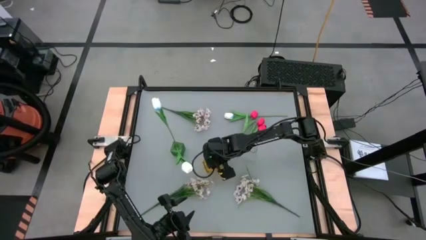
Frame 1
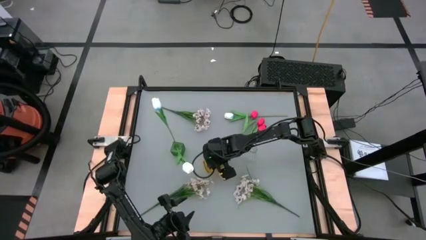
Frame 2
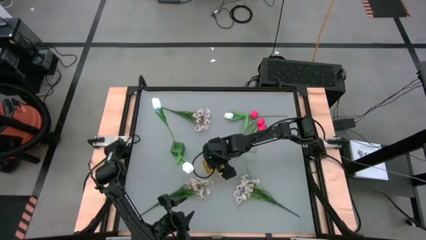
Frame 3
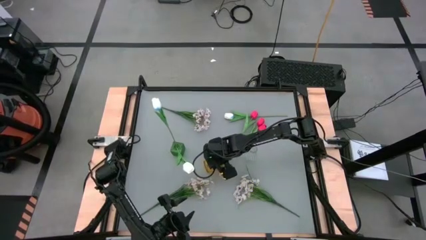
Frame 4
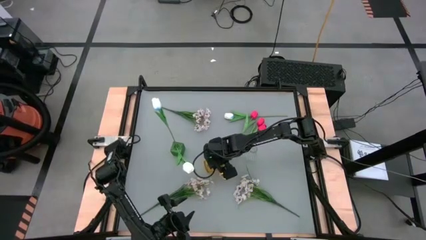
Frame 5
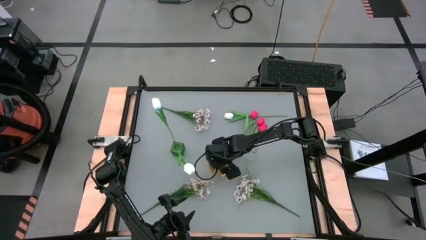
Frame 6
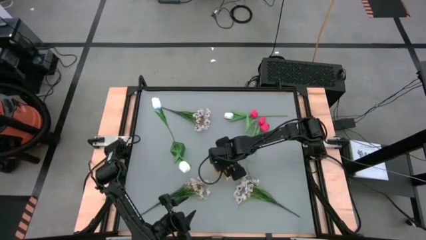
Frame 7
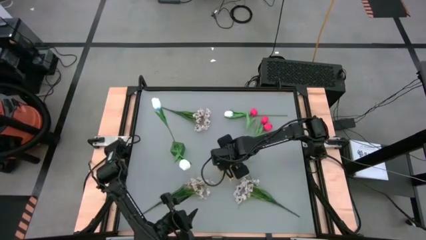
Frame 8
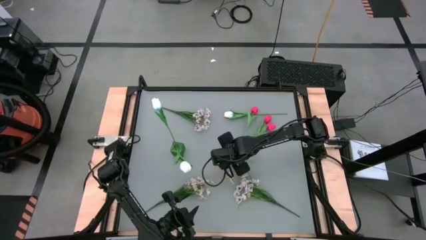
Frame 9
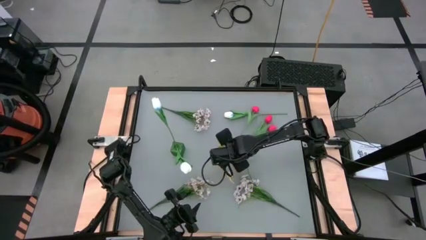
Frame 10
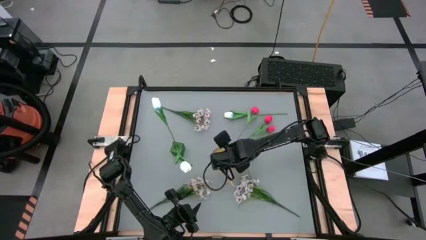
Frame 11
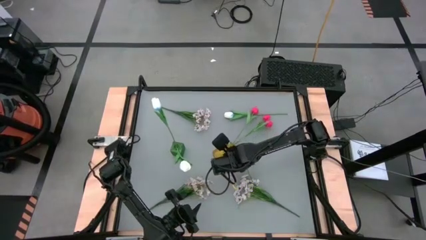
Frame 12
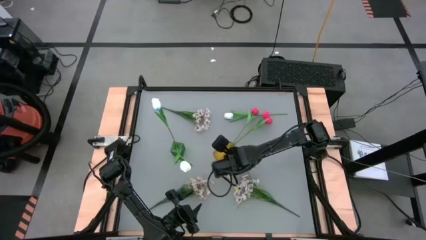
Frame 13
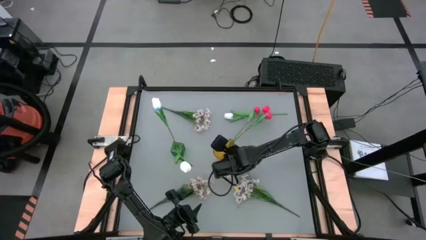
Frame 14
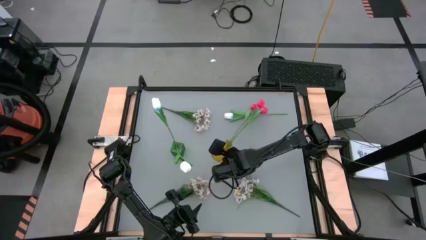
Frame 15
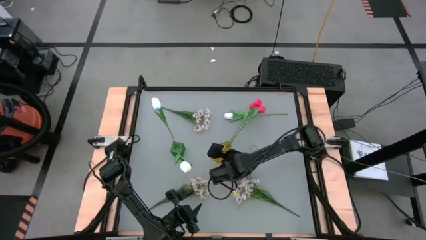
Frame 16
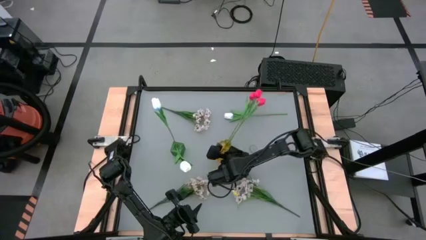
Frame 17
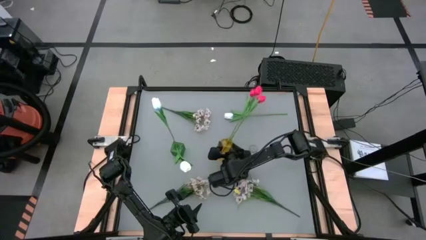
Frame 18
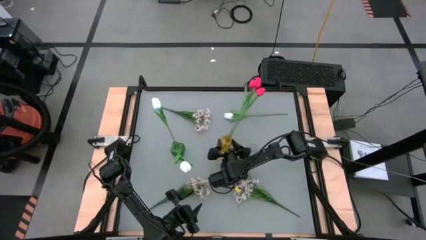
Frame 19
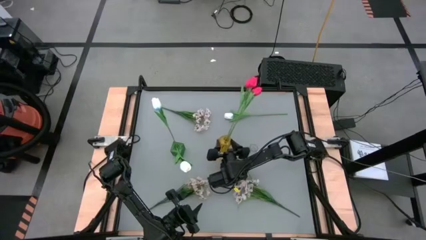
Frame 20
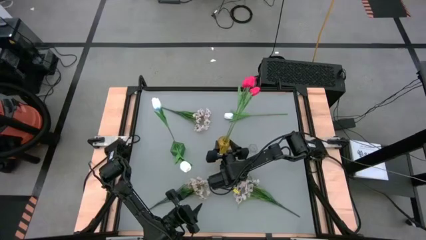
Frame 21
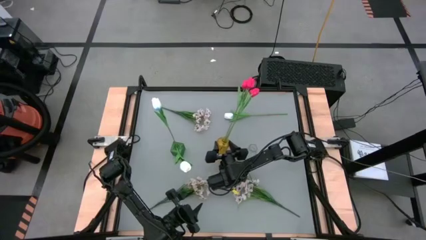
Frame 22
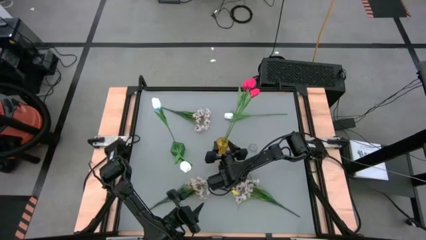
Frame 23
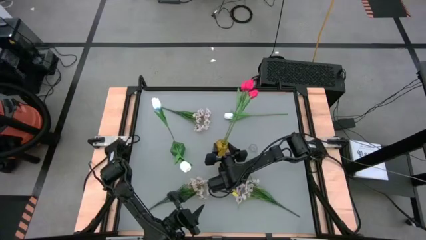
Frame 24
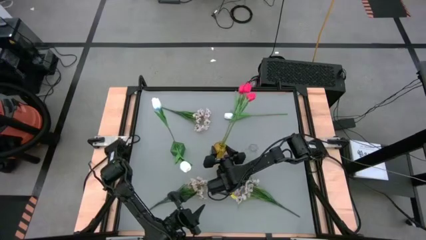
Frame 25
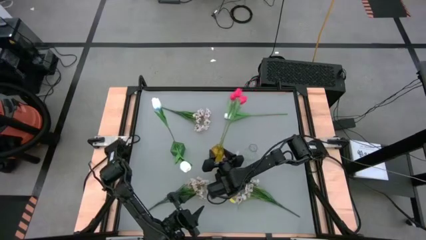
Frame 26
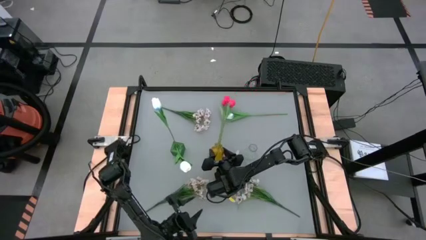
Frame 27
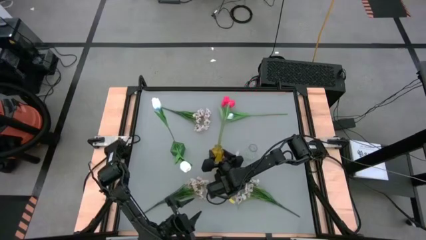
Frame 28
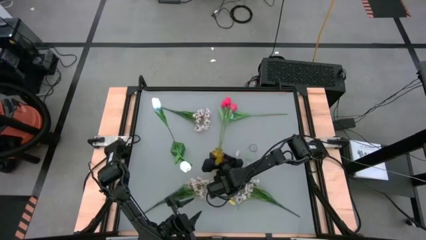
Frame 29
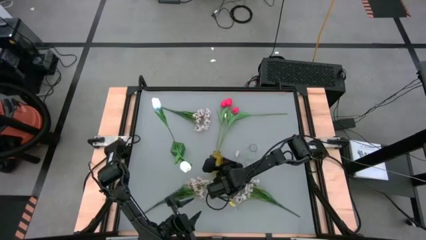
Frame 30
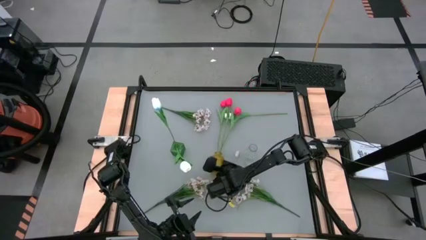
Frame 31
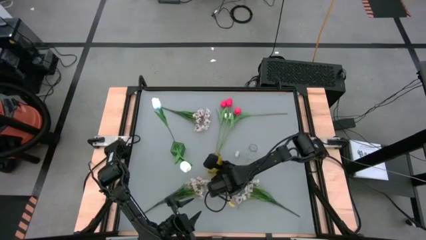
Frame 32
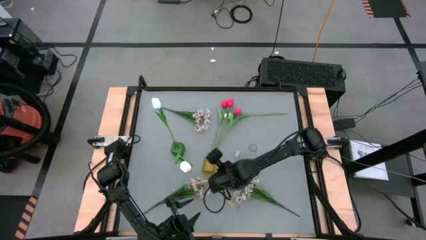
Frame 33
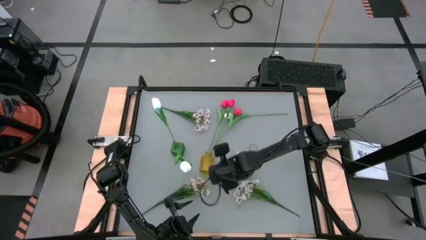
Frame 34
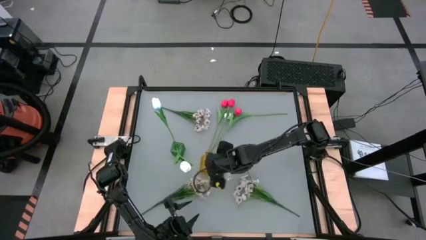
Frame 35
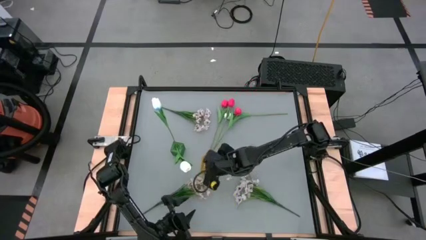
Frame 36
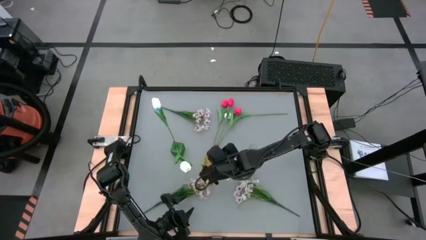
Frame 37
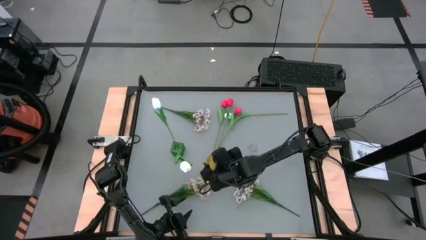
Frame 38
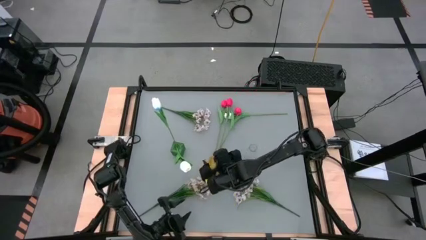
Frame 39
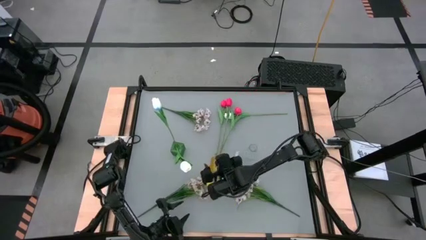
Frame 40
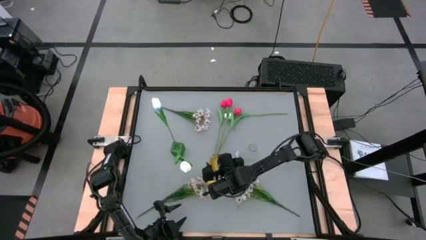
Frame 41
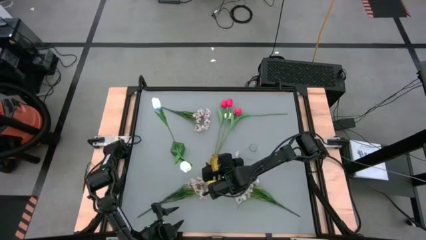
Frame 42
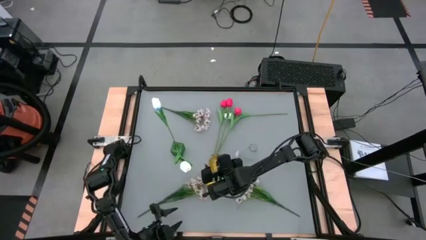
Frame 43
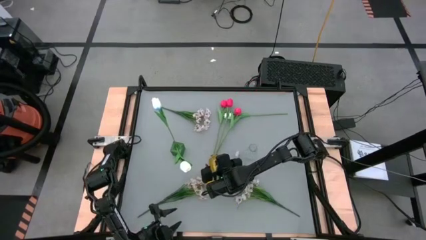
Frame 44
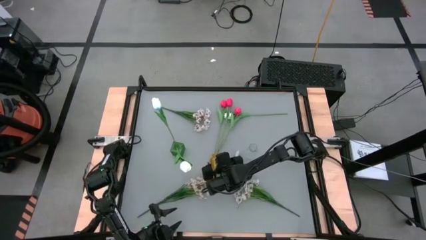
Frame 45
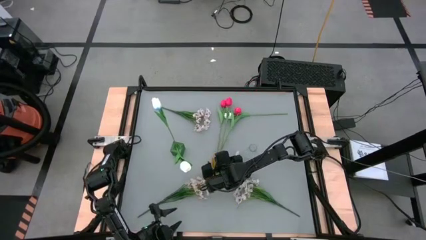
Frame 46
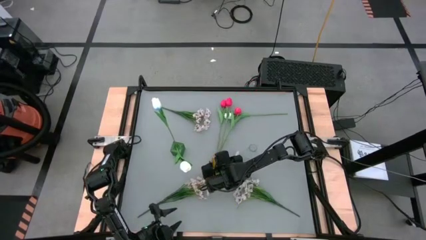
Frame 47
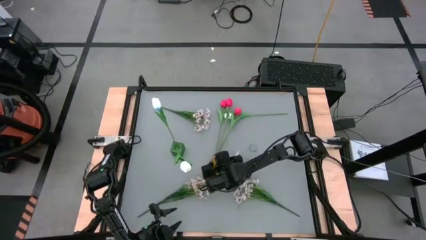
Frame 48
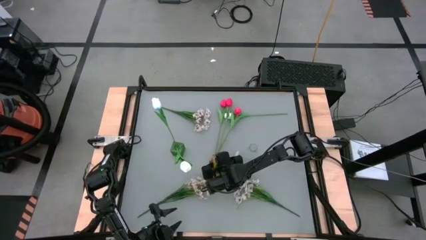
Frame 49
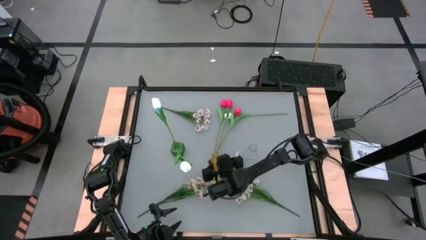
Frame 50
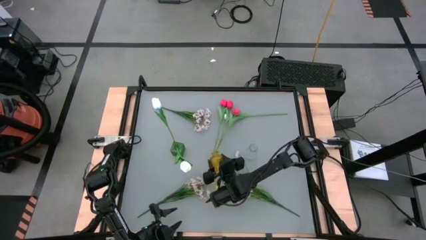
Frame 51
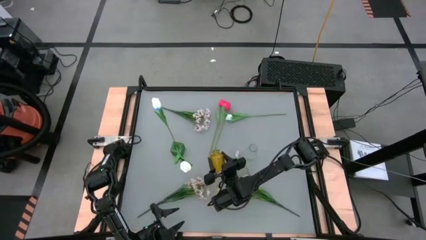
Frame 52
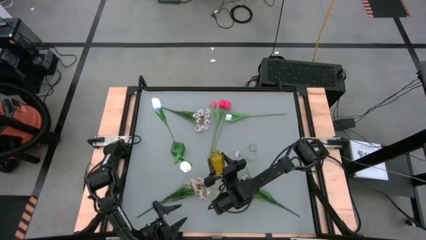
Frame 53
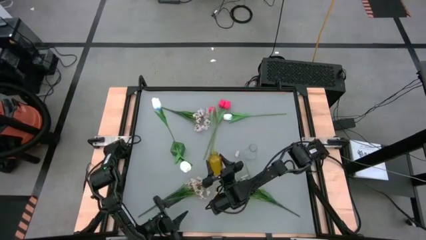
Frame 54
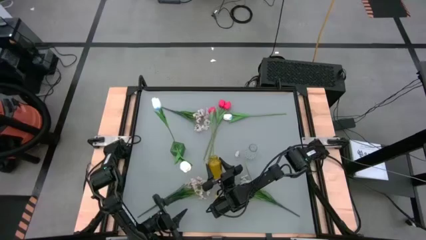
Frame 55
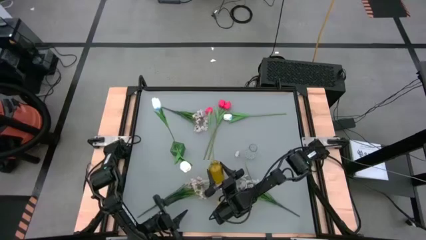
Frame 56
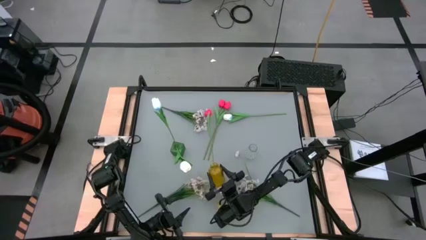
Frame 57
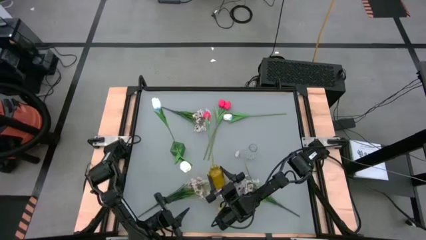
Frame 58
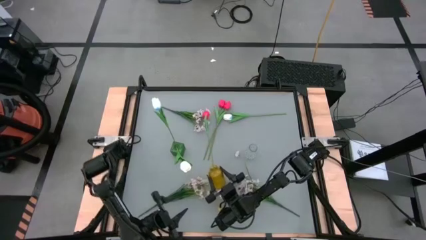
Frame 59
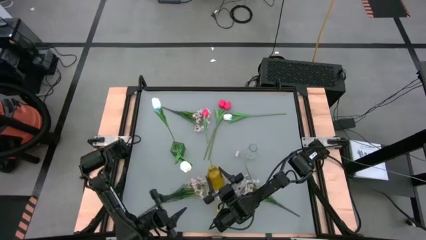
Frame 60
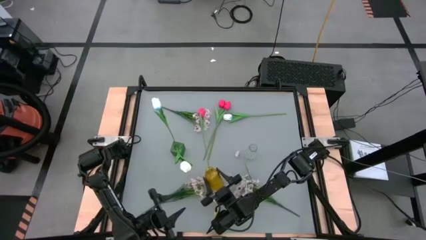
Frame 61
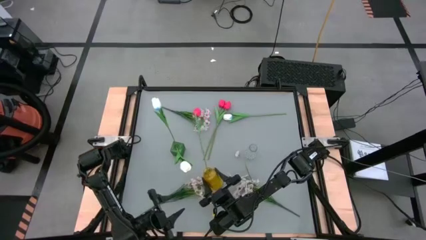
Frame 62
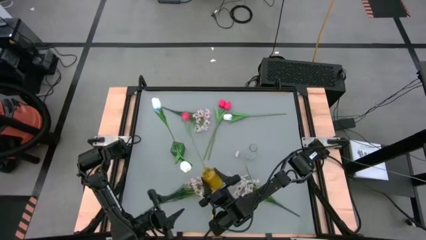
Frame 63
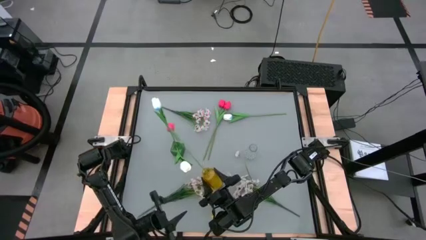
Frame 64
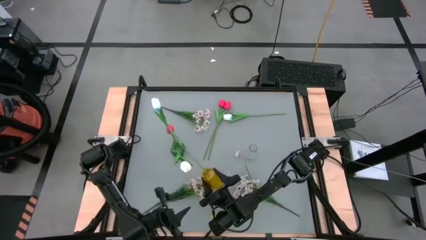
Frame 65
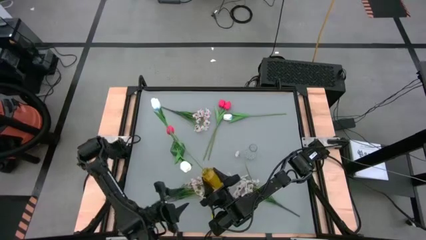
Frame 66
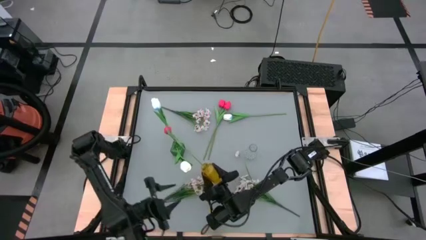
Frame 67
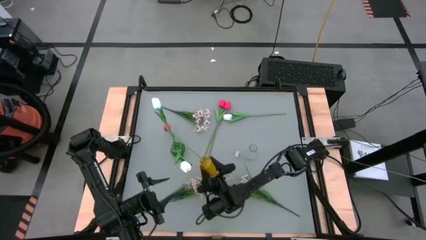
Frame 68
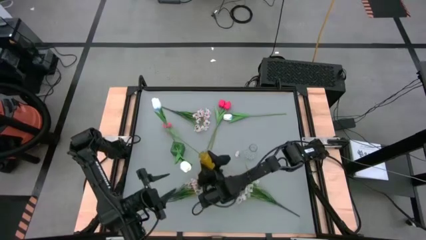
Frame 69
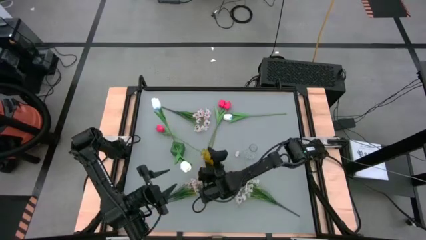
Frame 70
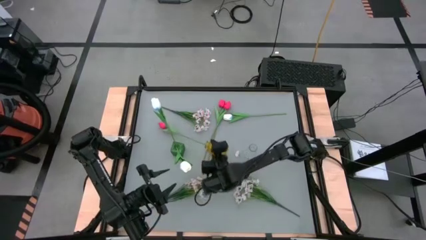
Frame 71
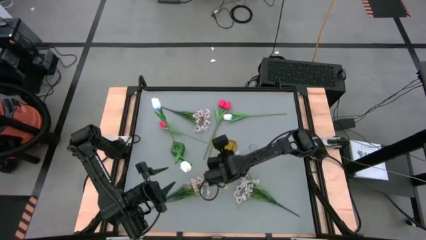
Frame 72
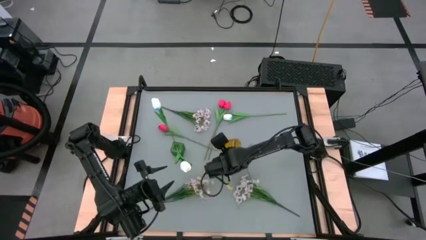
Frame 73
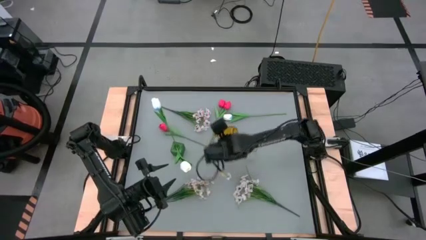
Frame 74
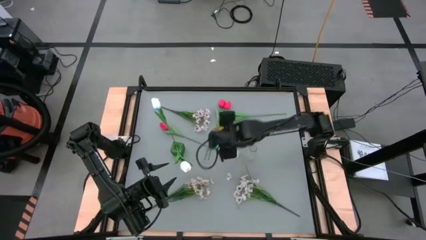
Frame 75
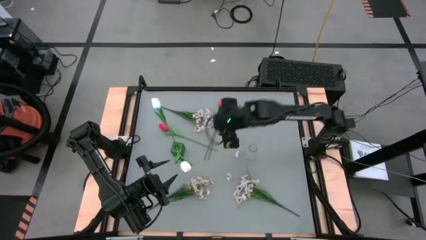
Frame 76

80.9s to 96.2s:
Task: Sort flowers into vase by color
Adjust the yellow flower vase

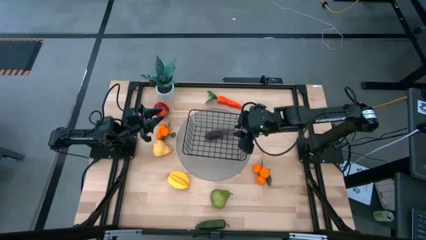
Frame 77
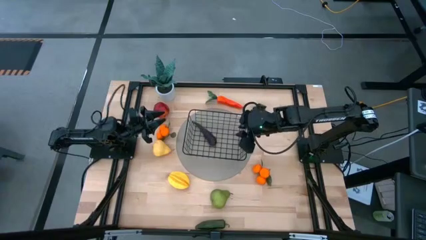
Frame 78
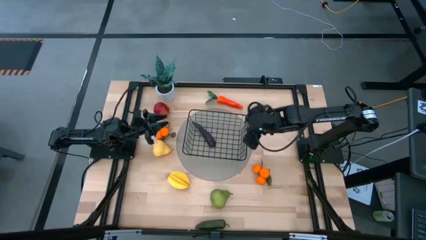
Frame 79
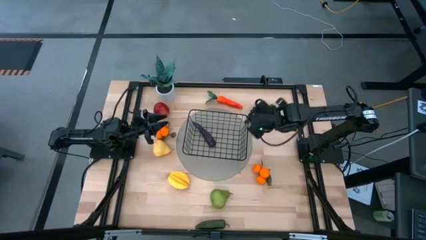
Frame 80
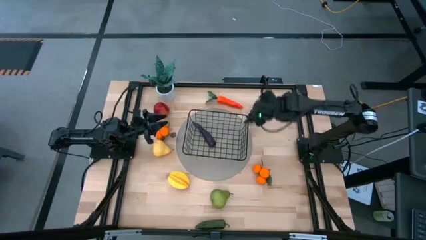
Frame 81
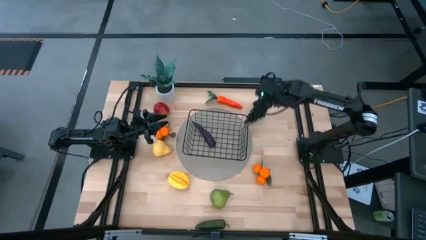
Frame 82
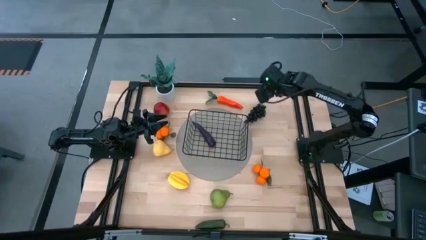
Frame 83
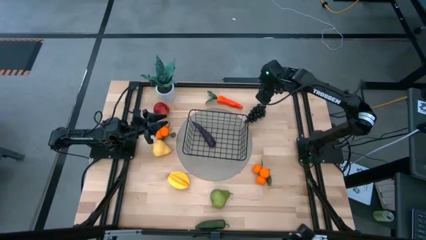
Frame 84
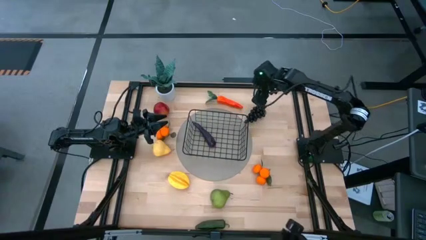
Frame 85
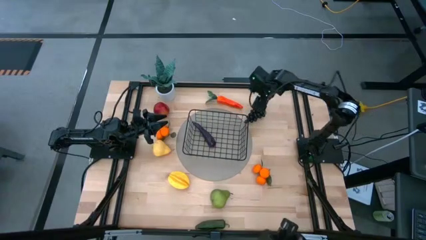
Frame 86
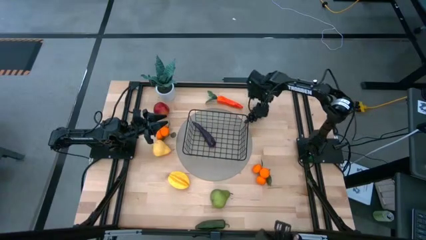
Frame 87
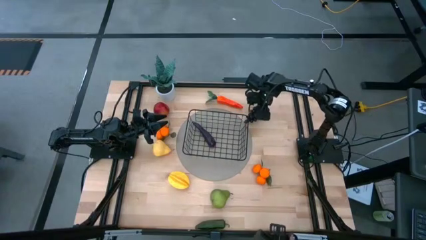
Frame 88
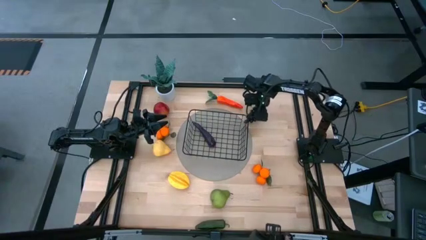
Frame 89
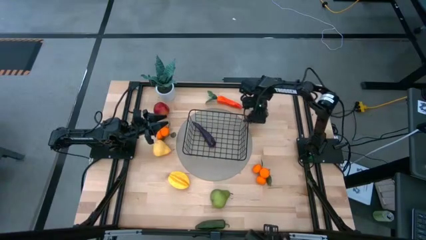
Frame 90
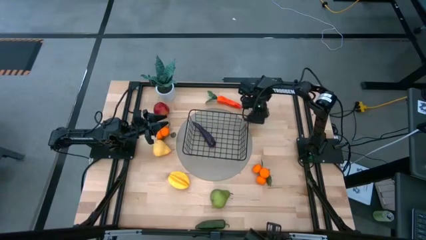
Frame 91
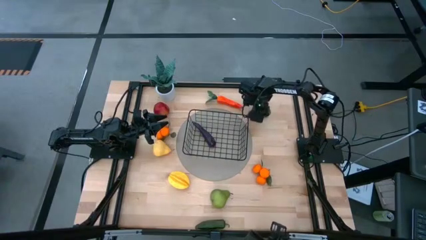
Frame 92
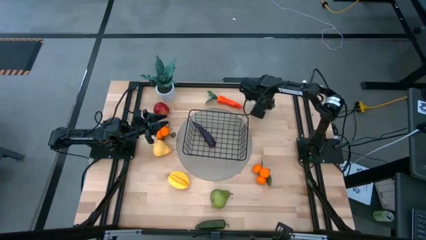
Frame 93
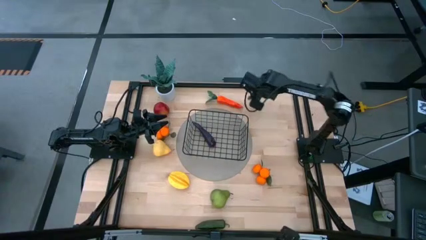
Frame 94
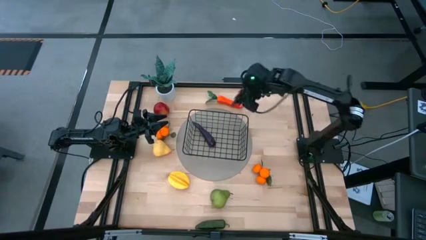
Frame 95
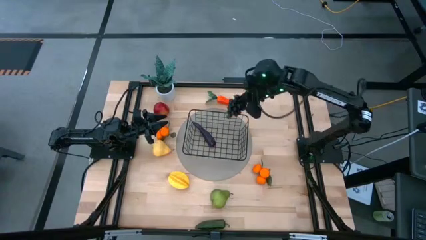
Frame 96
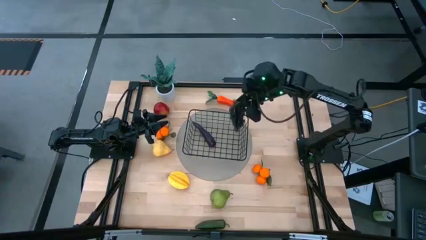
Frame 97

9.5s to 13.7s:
Task: Build produce basket
Put the black grapes into the black wire basket
